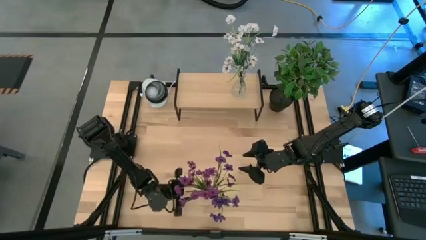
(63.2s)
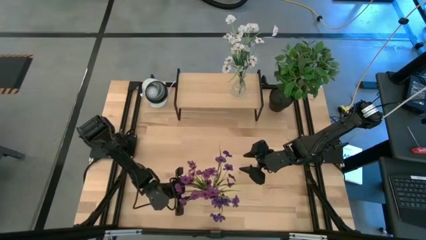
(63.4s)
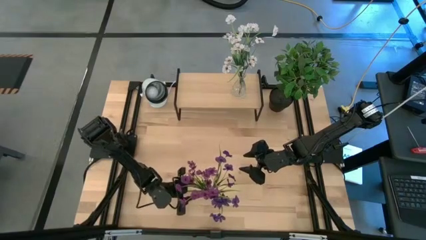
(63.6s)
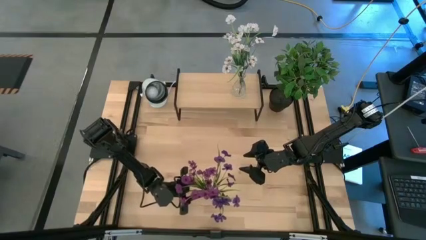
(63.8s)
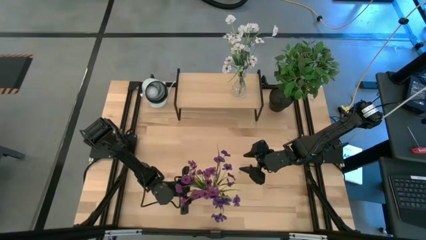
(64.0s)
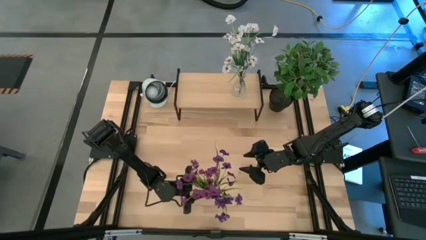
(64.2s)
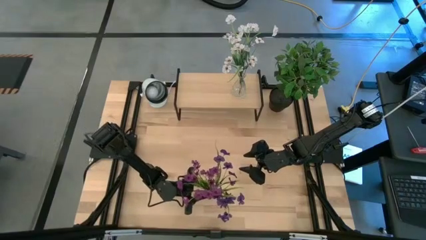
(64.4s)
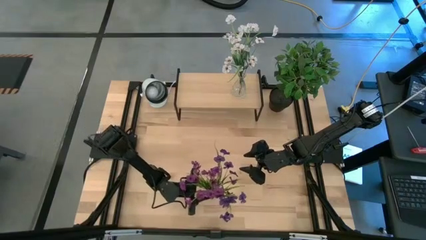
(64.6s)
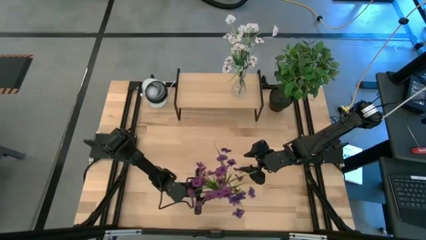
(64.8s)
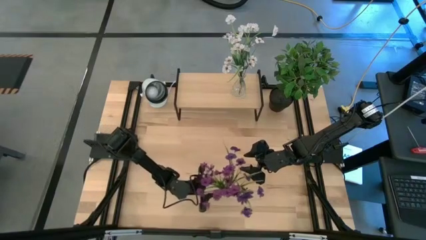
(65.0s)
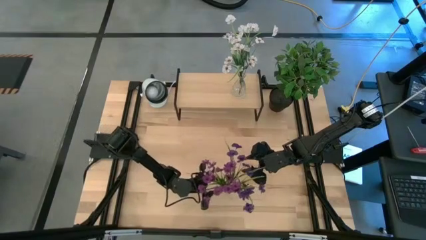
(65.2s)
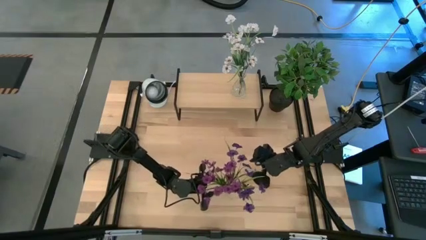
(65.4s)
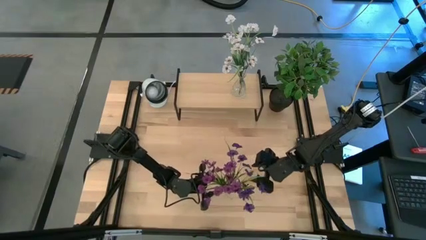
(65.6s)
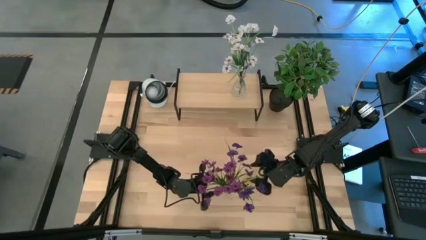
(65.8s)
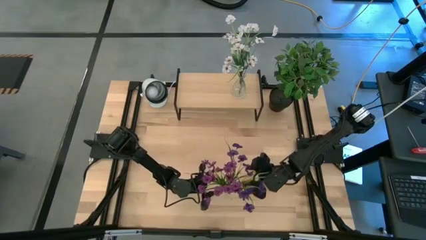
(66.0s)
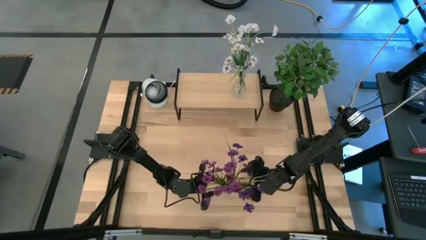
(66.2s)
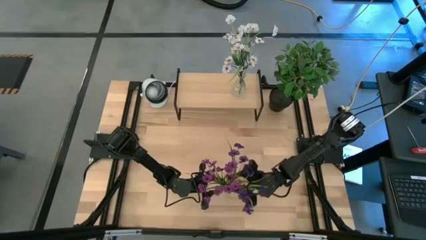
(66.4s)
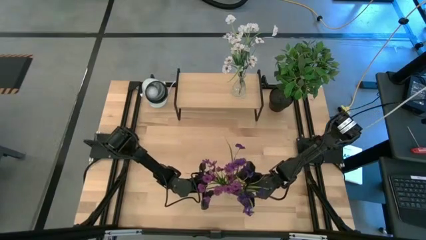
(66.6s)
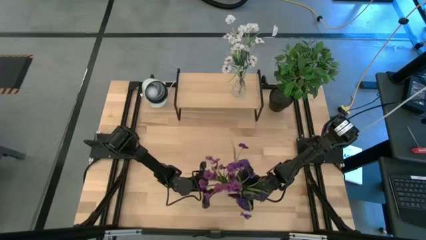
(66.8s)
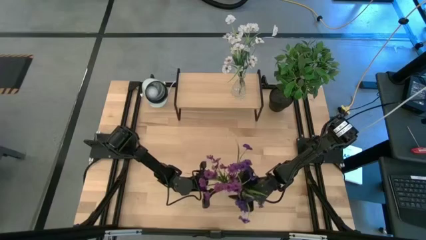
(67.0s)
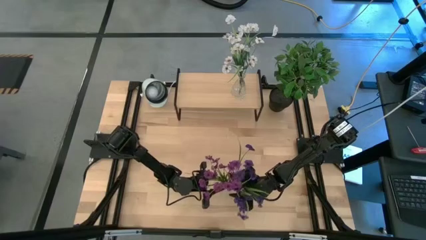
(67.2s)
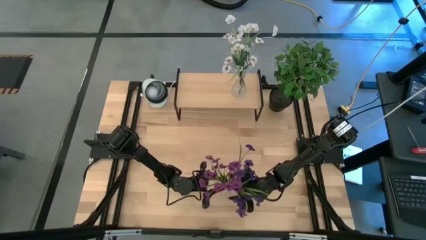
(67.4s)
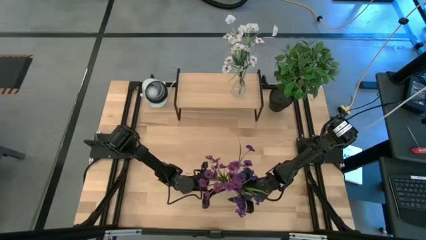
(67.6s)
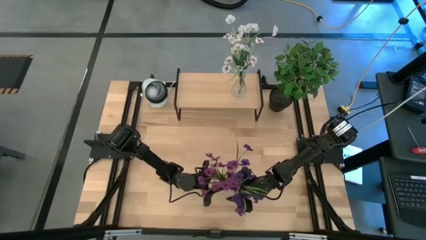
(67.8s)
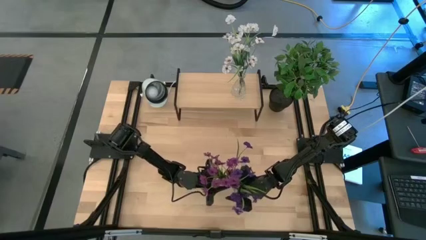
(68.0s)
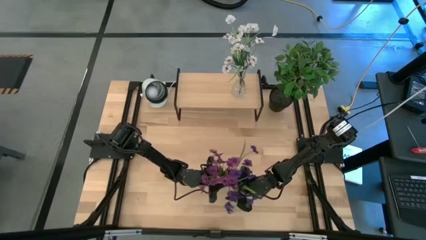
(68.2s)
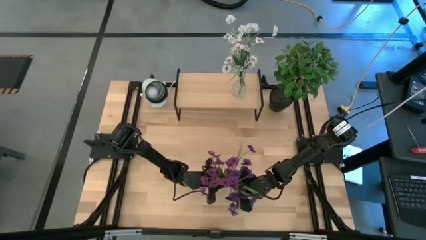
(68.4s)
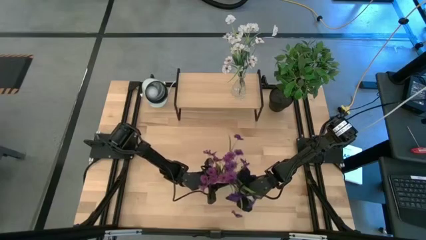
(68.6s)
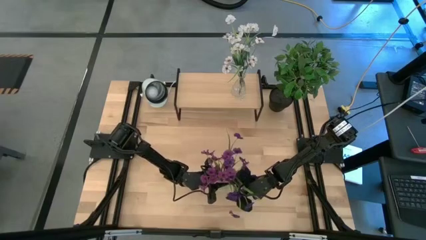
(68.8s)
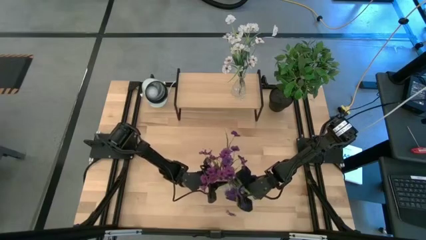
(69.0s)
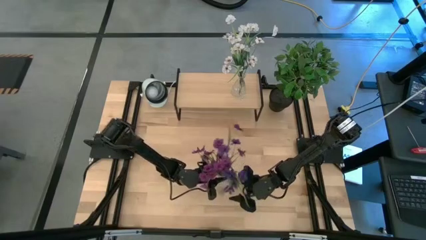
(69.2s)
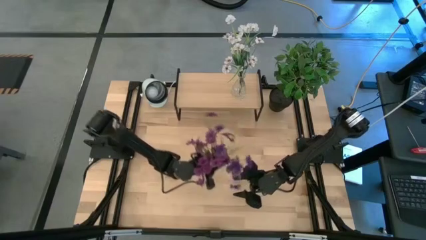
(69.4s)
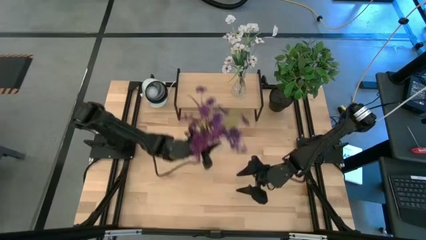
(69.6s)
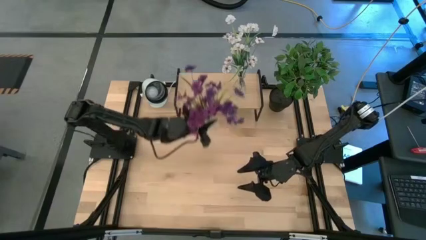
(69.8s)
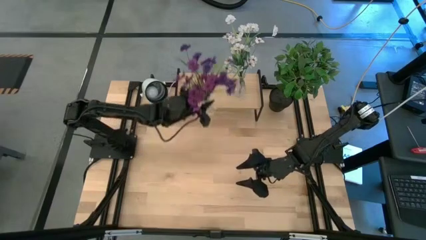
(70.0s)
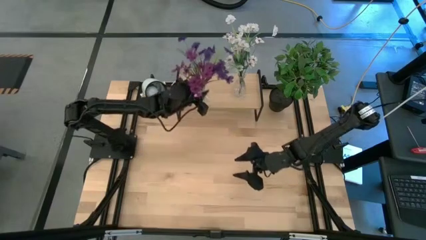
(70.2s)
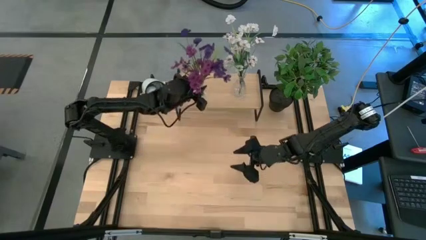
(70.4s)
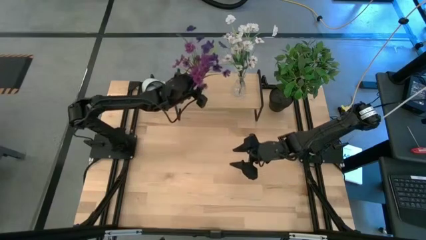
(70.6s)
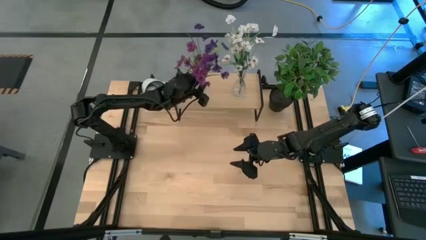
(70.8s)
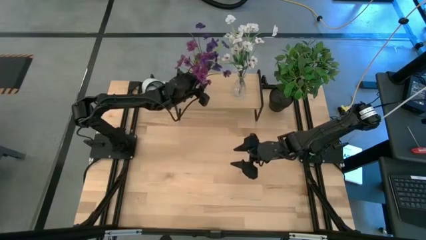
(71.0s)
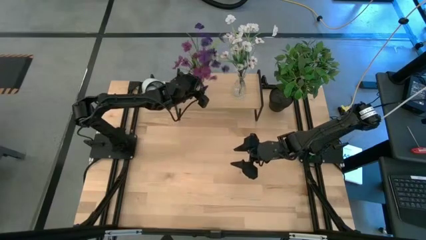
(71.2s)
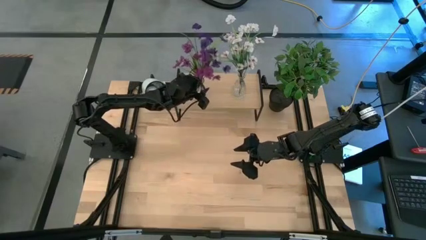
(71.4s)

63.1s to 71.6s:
Task: Pick and place flowers into a vace then onto a shelf
Put the transparent vase on the shelf

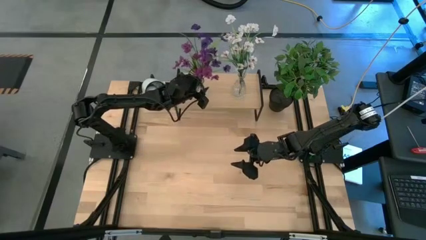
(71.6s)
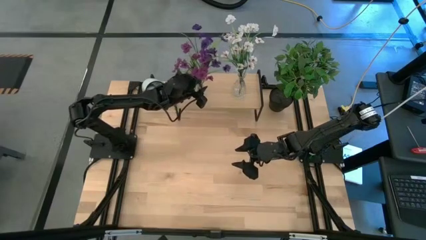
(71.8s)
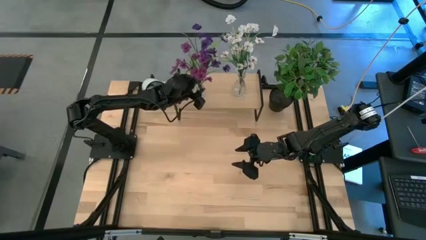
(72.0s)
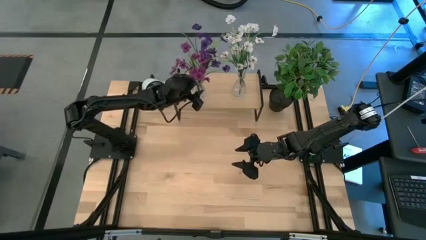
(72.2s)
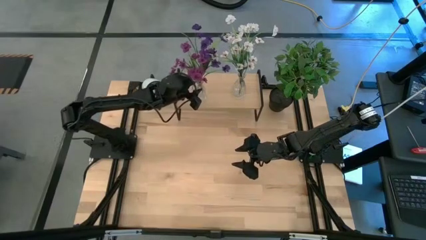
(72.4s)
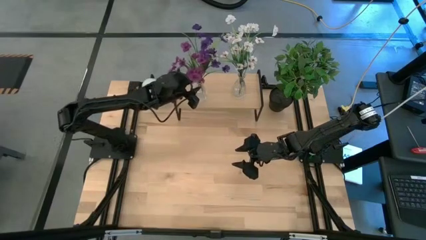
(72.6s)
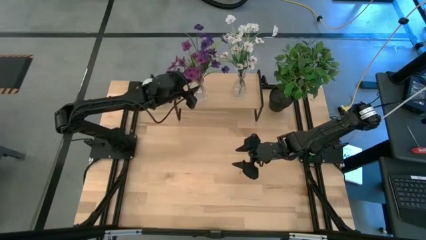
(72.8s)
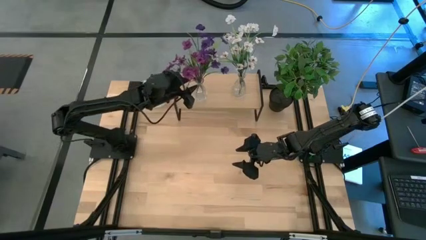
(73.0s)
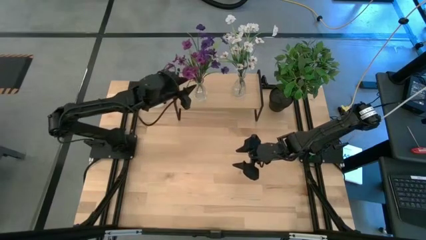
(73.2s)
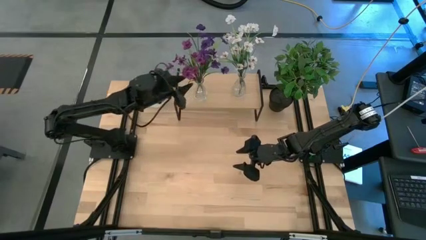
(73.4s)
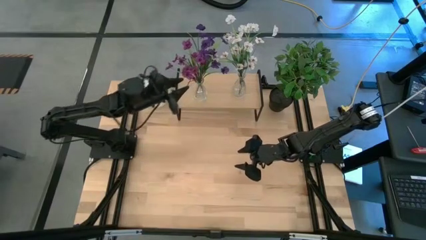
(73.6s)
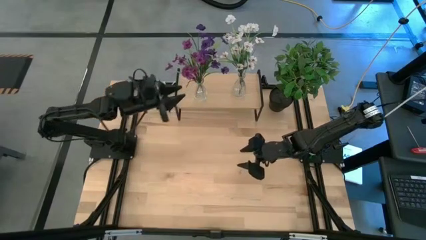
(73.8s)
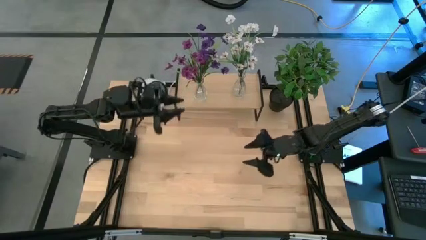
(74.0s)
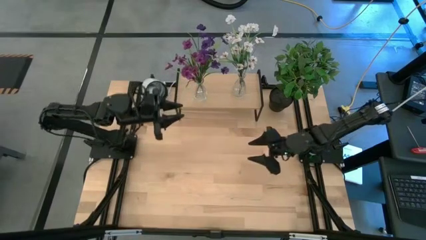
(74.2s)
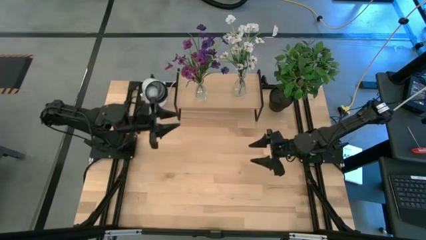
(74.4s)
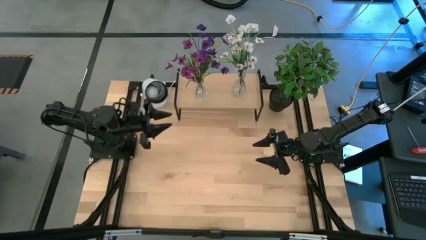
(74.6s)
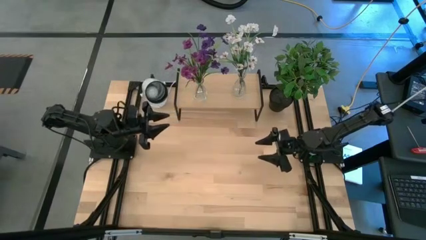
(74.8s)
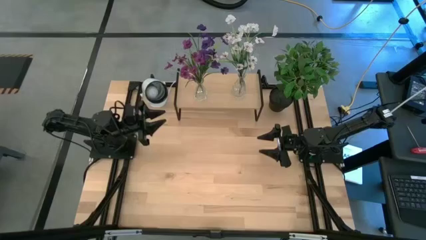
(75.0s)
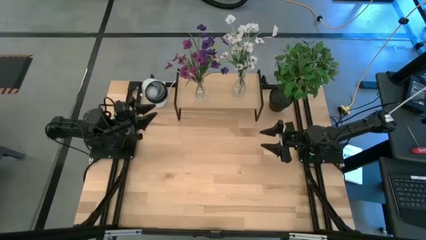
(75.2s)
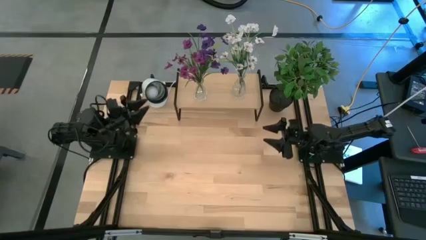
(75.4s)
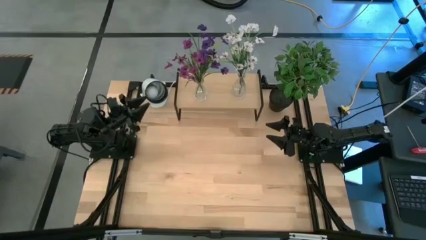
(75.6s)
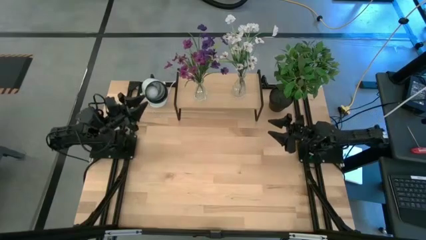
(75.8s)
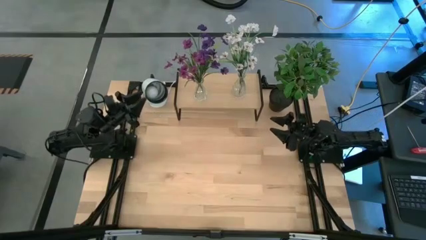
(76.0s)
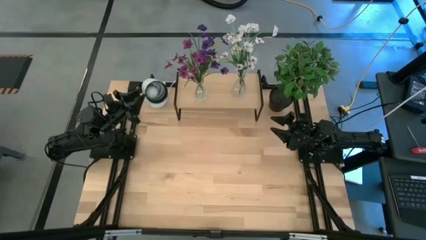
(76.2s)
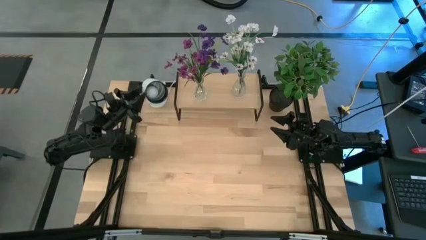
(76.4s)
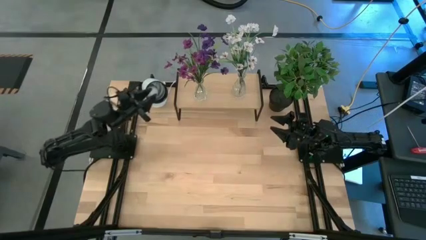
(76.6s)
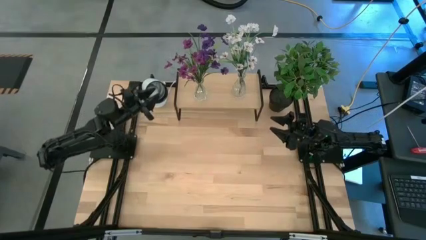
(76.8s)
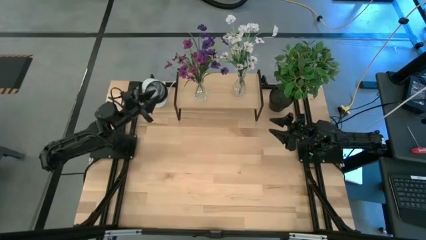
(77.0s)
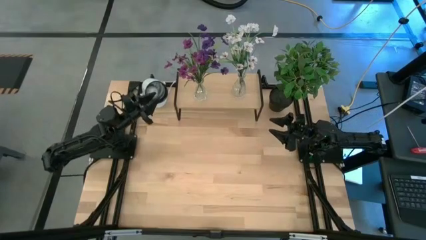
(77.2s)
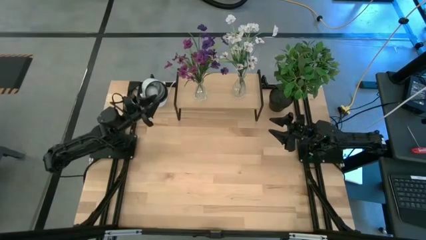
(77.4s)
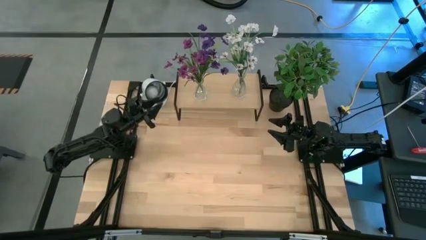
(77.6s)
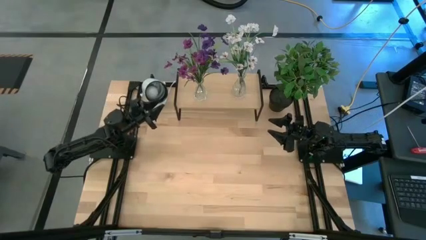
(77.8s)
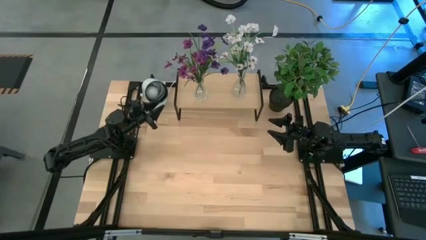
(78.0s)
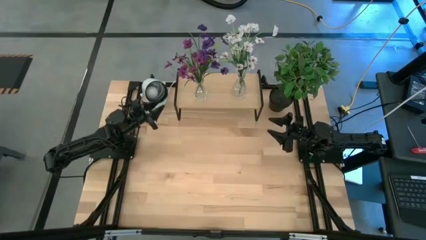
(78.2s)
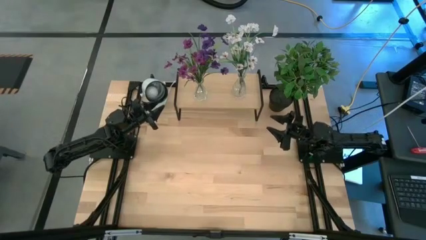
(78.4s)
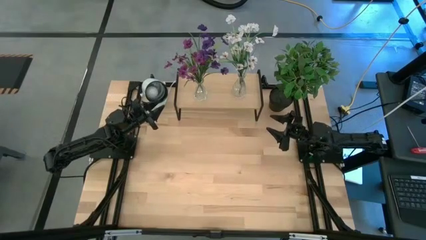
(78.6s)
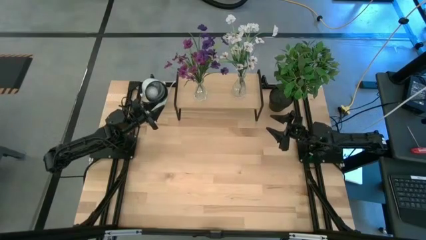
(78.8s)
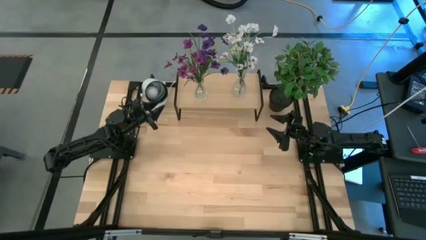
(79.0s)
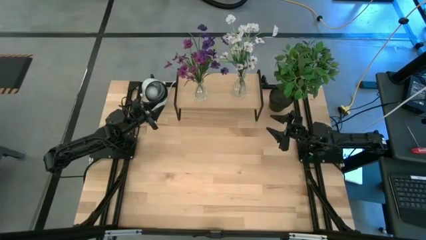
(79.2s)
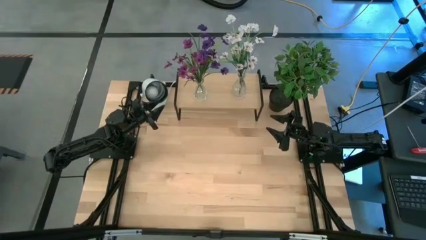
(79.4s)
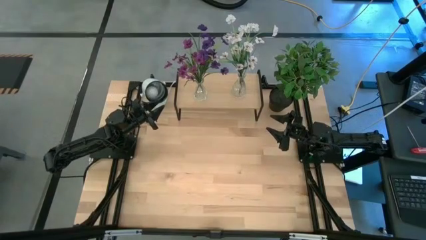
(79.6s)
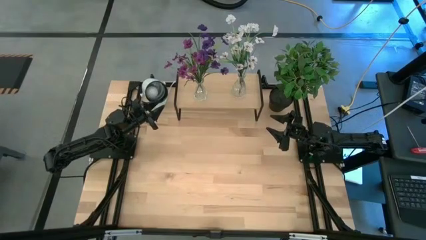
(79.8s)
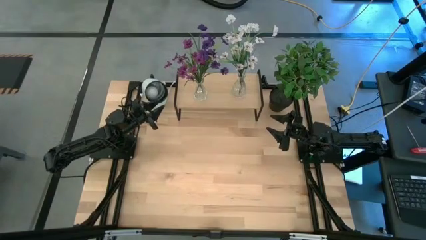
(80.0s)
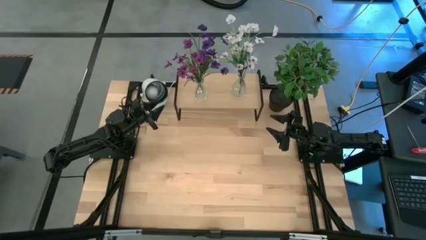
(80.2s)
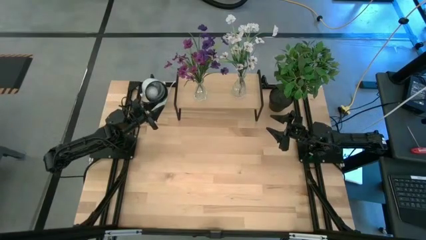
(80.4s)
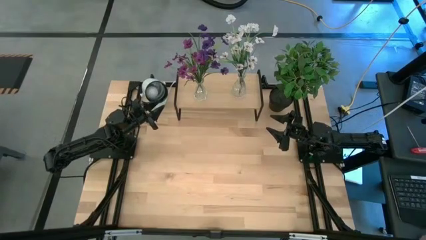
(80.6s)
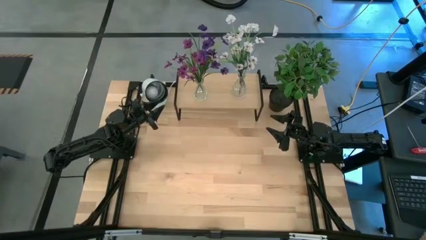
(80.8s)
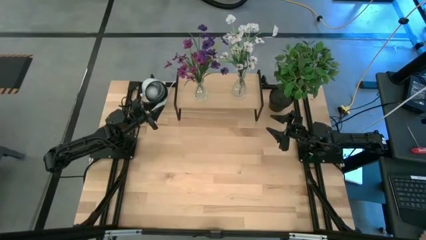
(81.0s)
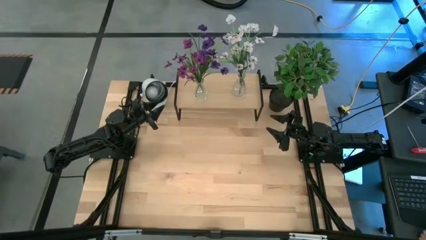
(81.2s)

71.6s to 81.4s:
Return to Home Position
